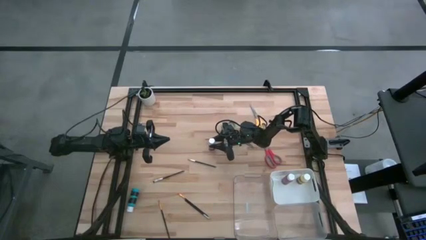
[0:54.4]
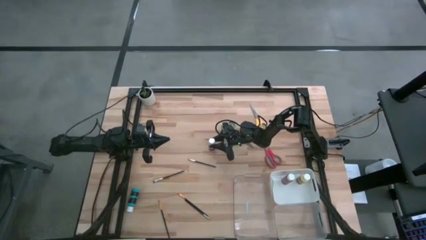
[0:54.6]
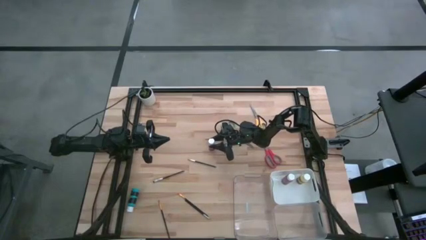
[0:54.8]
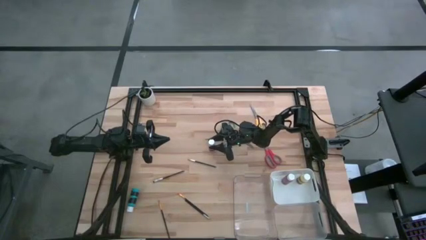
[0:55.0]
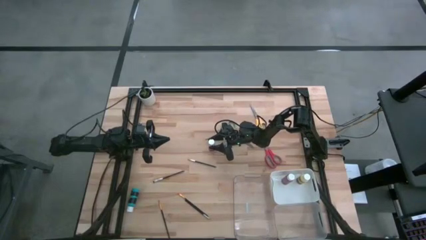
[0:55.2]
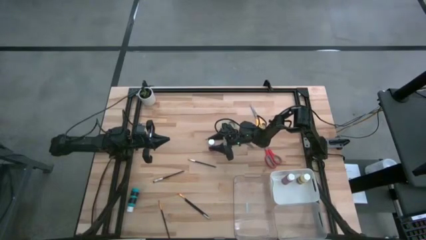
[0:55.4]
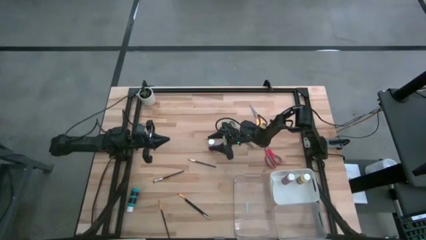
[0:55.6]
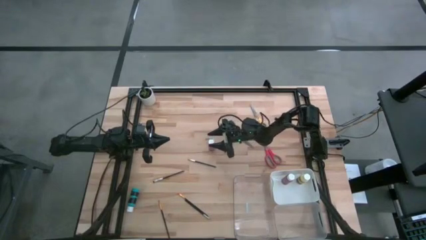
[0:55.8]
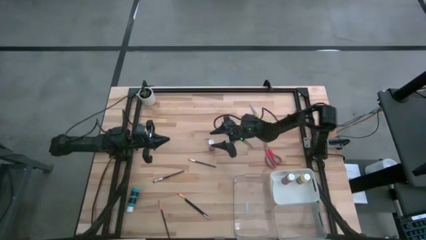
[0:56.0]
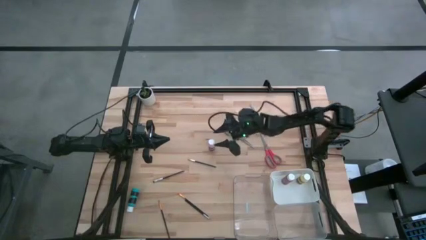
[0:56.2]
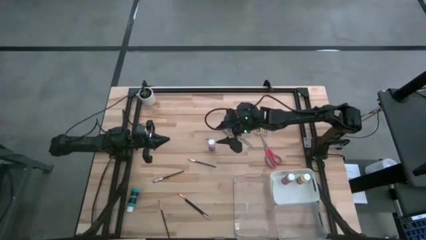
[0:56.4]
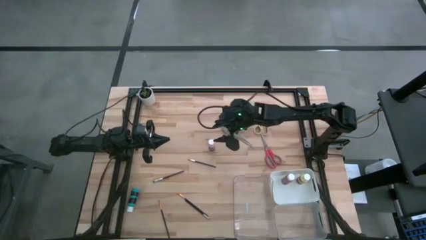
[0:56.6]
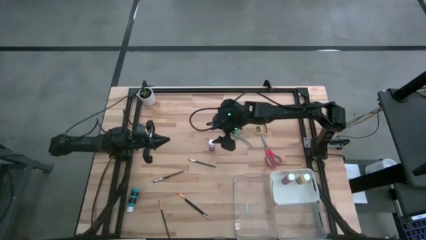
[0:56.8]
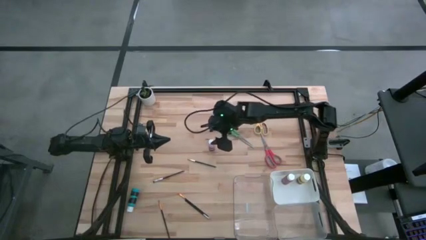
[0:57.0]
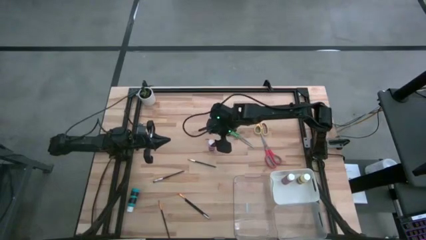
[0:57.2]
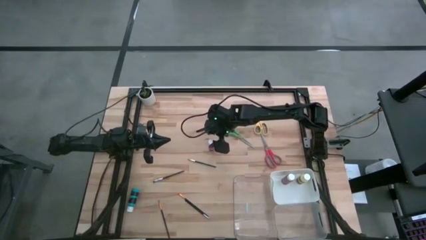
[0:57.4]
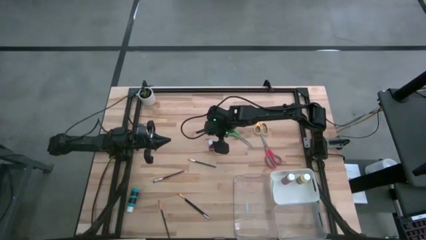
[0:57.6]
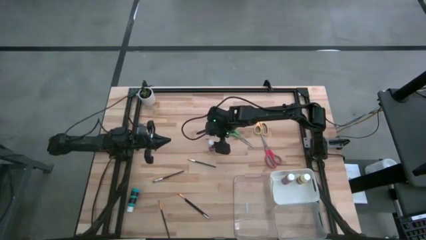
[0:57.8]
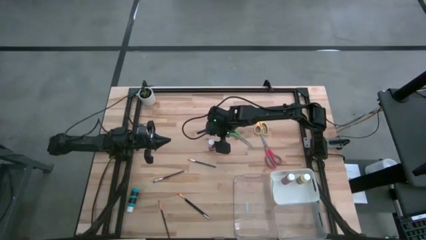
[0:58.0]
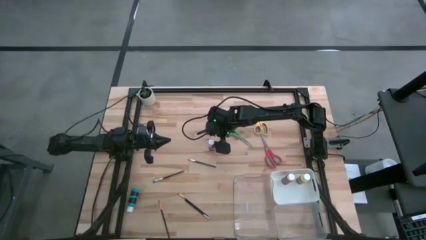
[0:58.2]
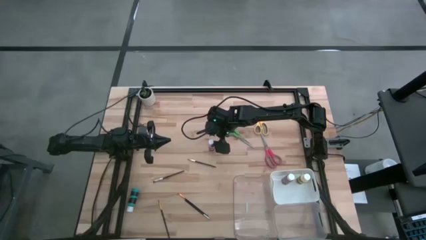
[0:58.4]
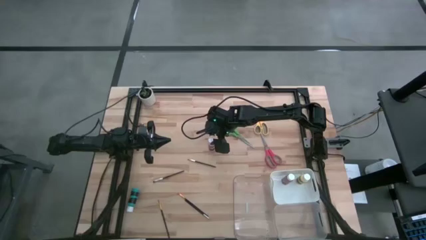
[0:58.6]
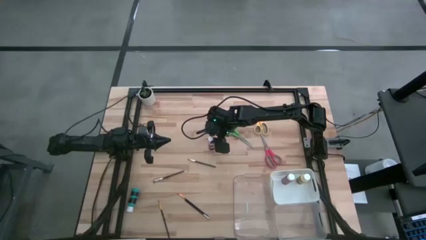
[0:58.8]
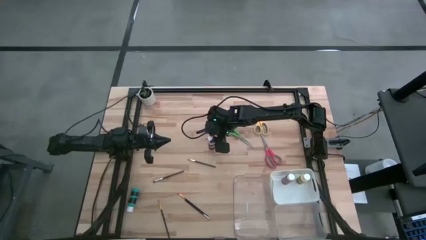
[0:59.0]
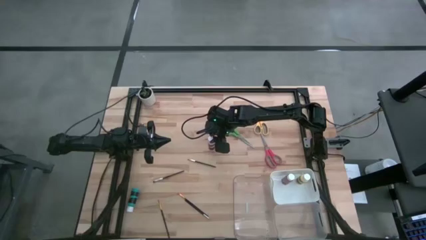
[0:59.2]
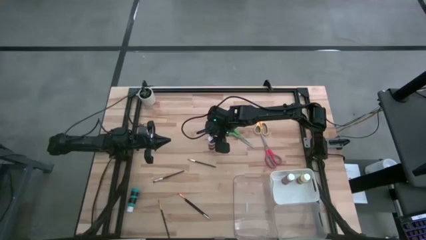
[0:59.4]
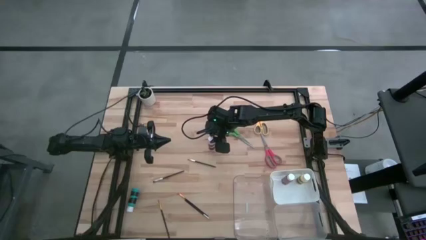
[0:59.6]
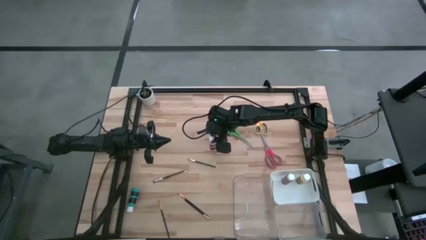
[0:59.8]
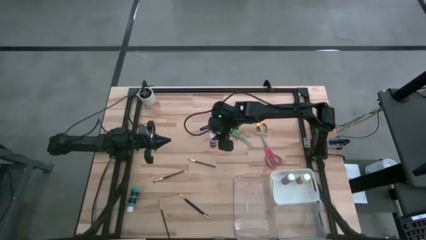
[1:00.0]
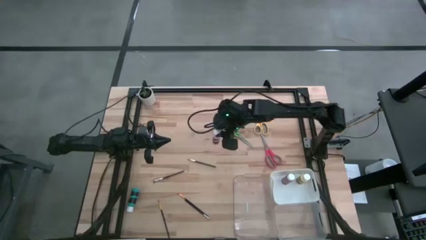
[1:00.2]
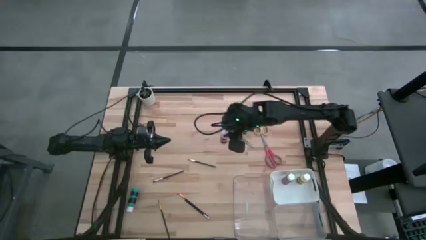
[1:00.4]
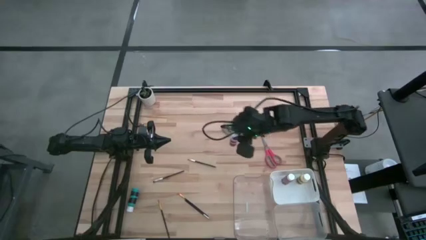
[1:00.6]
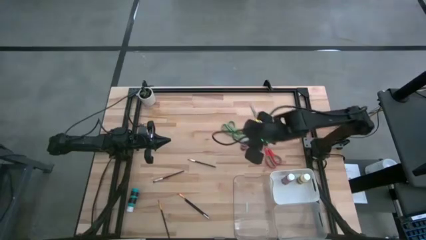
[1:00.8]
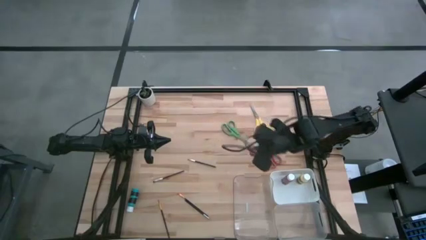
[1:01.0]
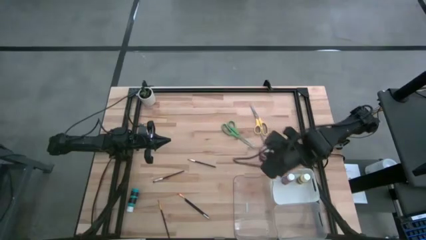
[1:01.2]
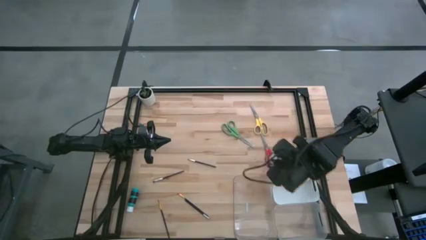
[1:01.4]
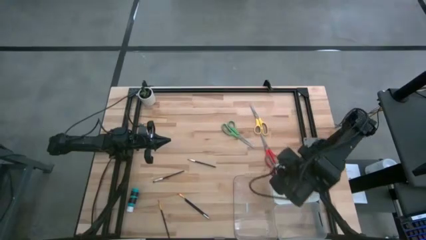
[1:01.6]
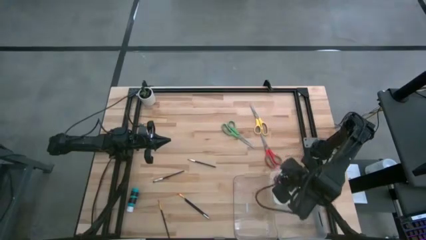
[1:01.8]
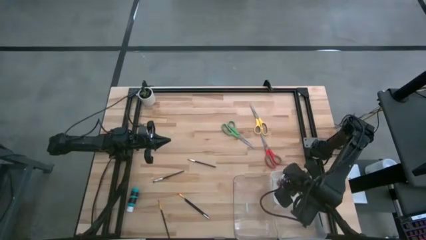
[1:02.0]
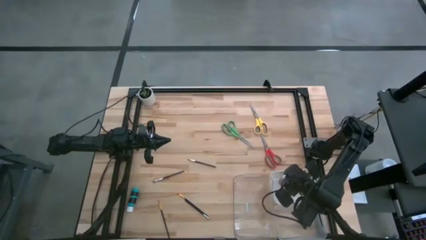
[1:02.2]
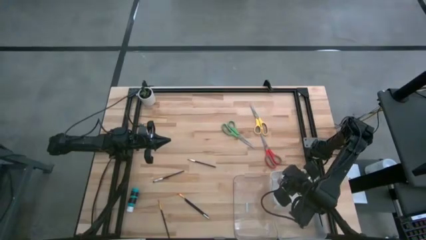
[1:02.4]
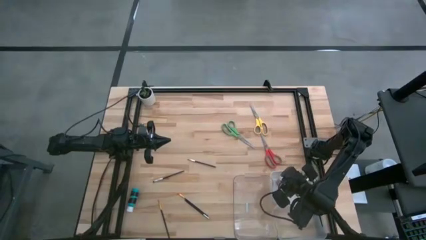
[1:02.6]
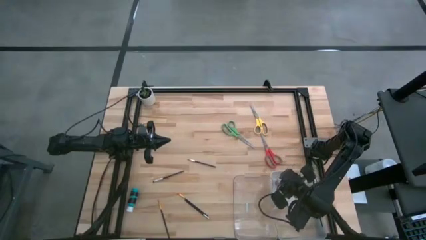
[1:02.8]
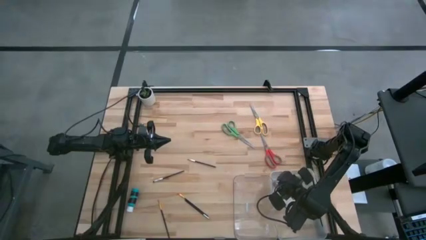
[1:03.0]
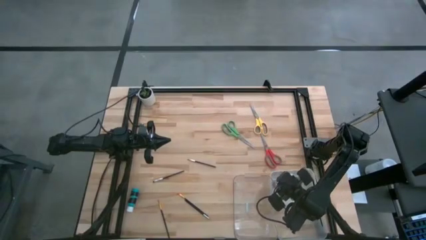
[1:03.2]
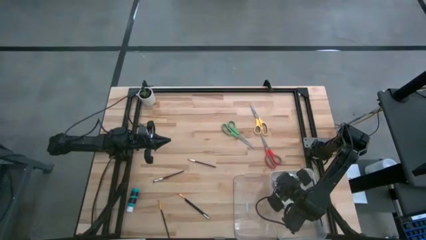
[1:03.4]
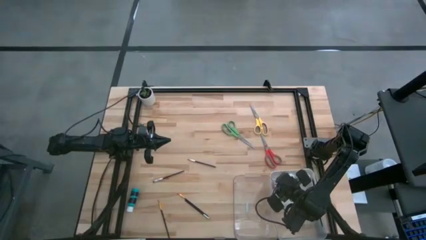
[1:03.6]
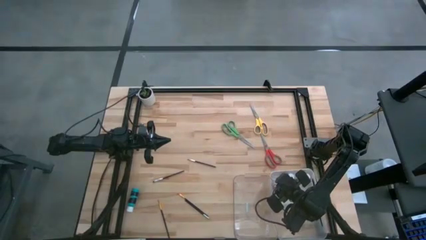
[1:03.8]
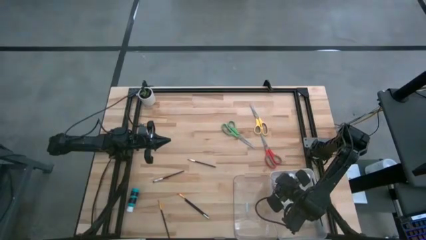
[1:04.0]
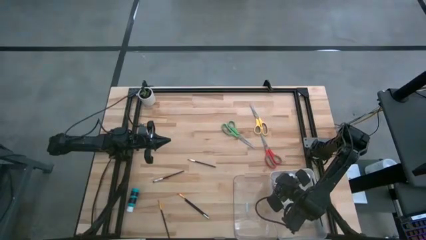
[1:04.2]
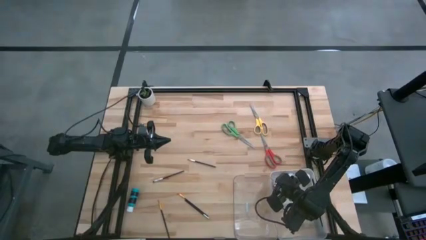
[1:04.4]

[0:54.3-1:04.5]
Task: Pick & Place Paint Supplies
Put the pink paint bottle into the white bin

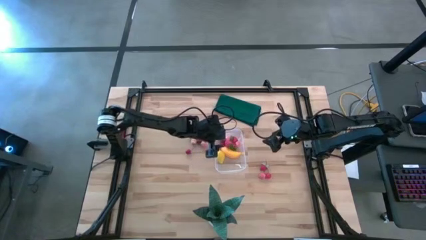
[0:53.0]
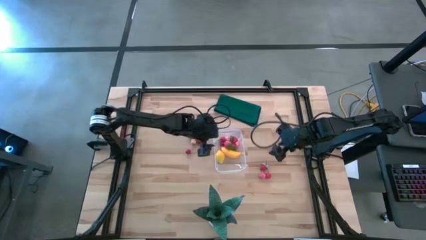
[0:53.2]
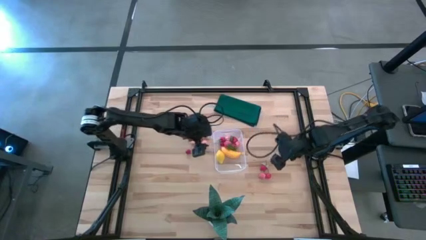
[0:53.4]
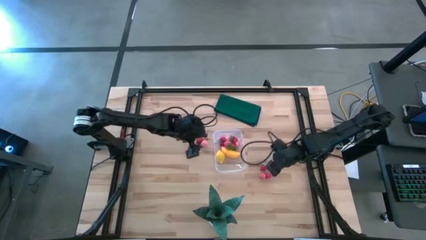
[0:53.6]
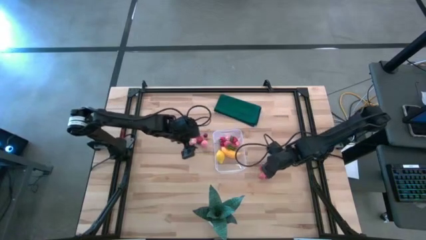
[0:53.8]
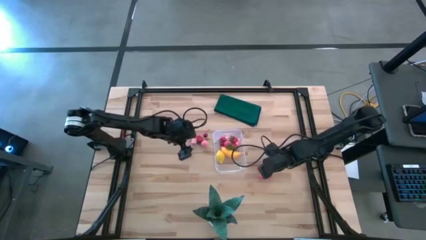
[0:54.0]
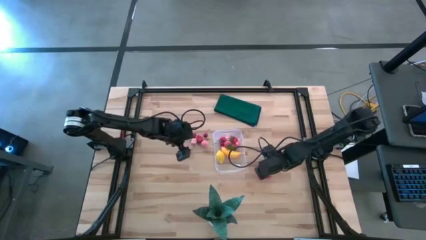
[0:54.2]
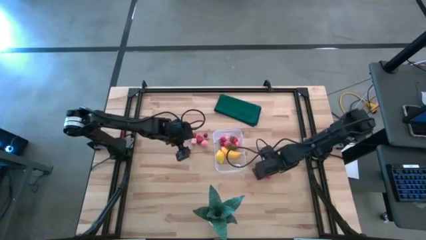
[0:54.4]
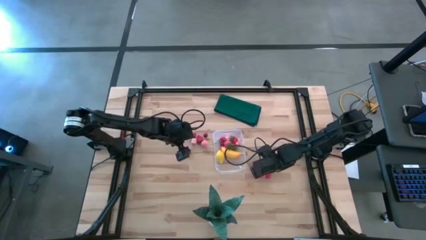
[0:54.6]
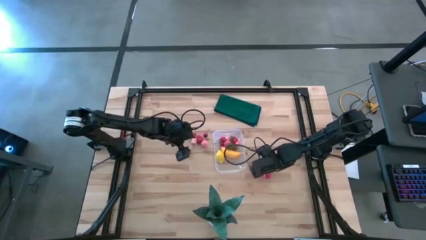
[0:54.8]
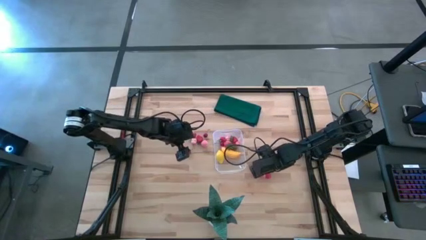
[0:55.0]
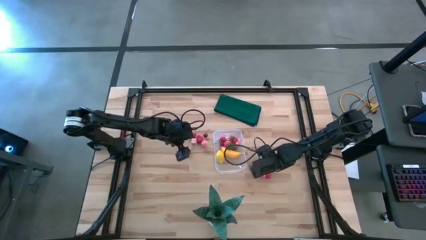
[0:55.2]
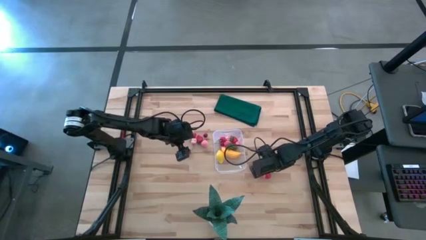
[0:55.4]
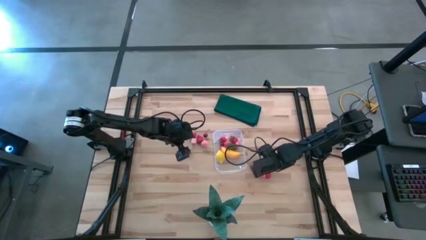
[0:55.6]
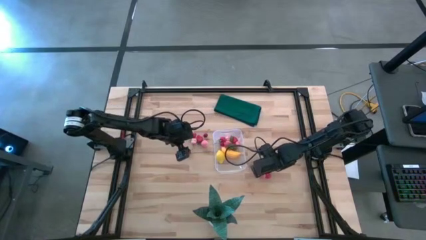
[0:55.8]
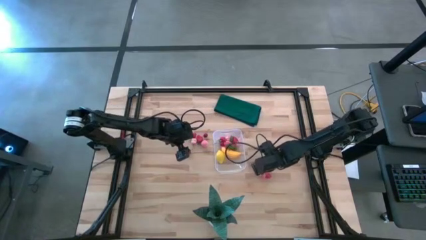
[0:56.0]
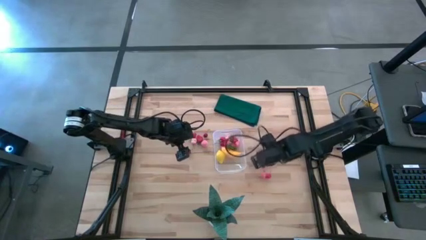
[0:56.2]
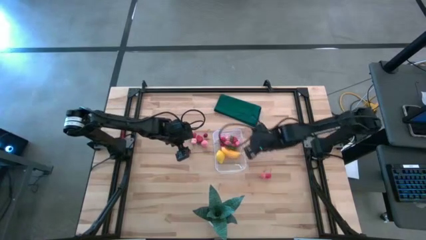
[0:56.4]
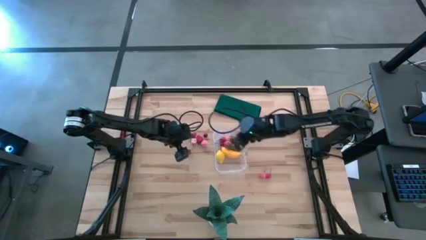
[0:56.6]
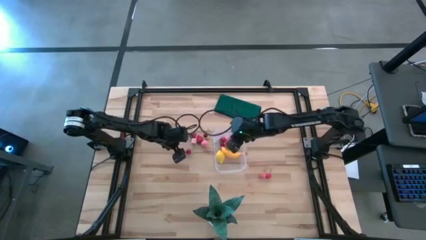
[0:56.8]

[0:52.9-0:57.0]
Task: Pick and placing Produce into tupperware
Put the strawberry into the transparent bin

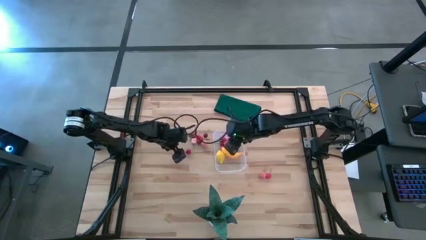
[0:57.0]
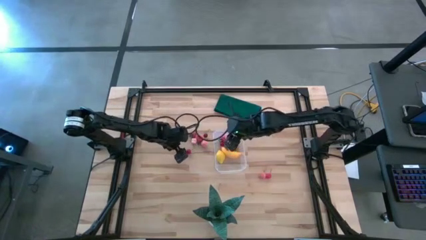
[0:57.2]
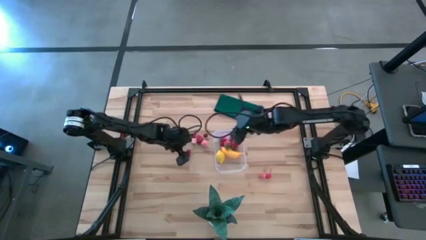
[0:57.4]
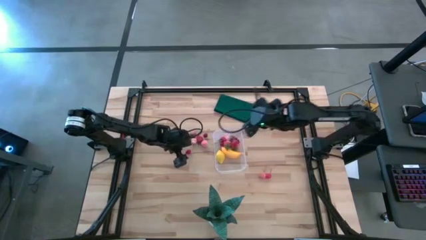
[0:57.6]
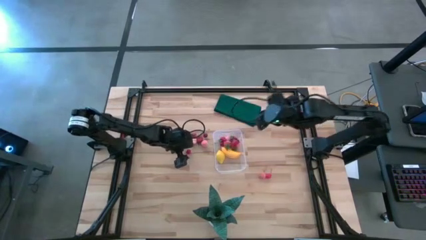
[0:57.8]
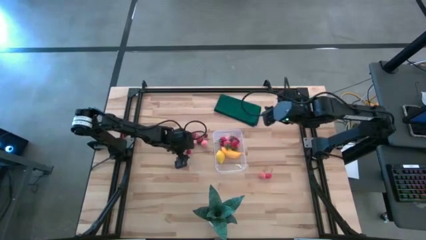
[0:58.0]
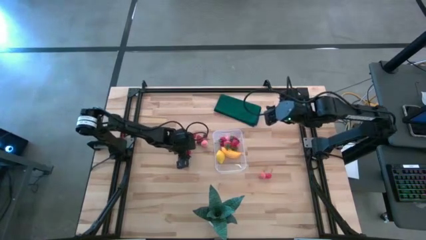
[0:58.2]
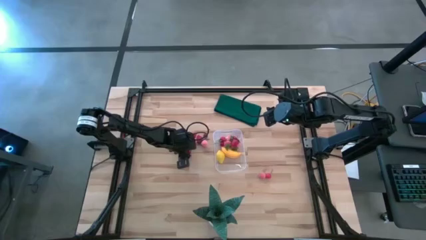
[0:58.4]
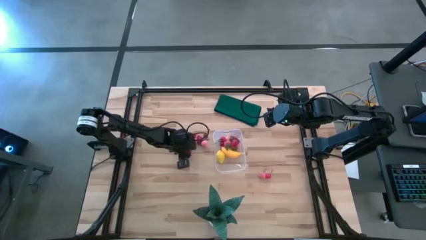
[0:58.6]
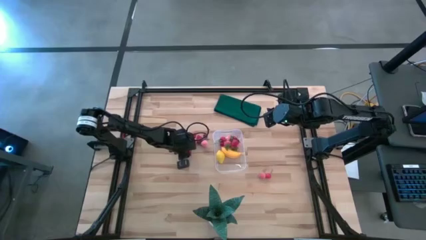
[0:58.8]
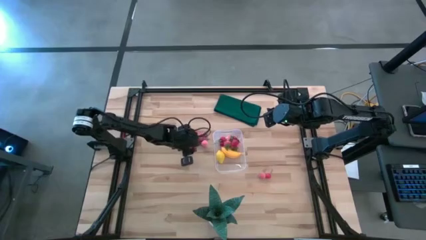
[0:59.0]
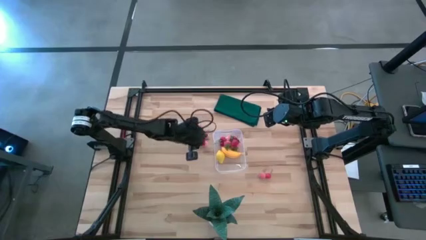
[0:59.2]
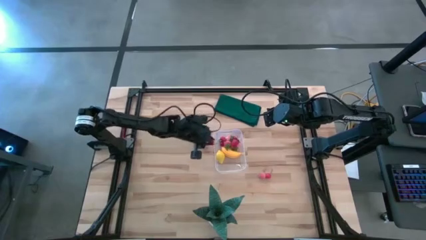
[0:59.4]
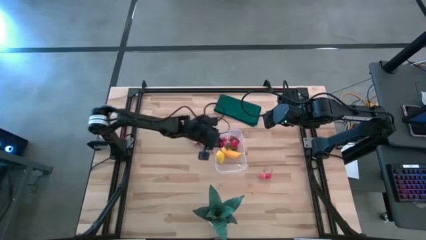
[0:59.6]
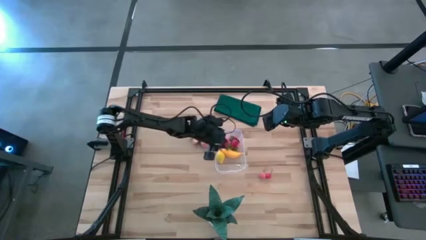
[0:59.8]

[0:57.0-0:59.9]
Put the cherry into the transparent bin
